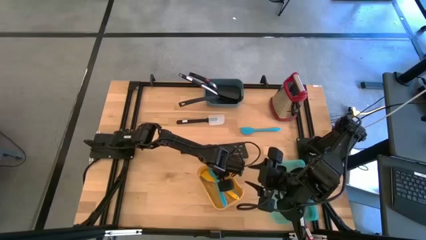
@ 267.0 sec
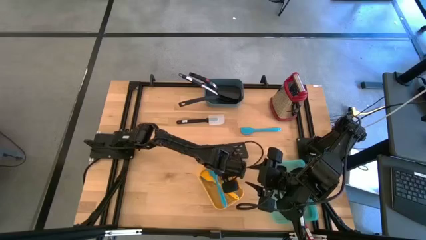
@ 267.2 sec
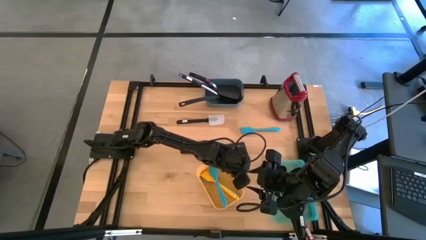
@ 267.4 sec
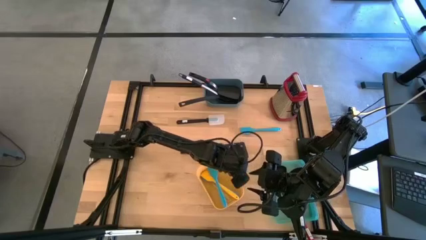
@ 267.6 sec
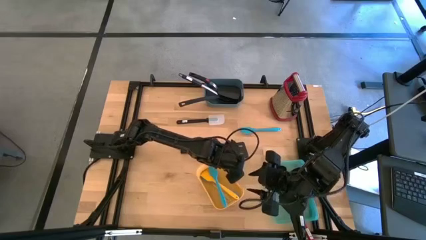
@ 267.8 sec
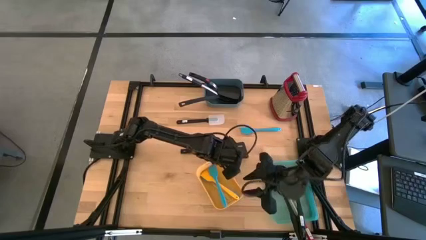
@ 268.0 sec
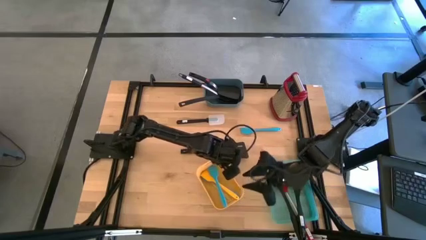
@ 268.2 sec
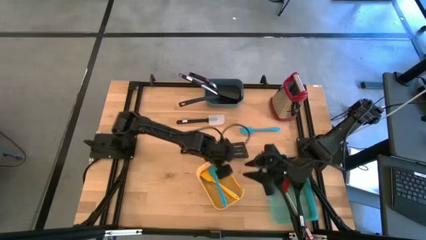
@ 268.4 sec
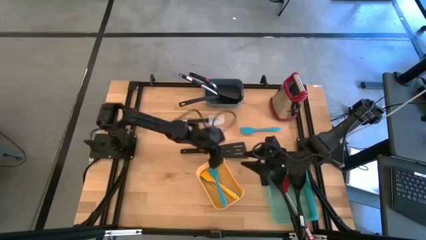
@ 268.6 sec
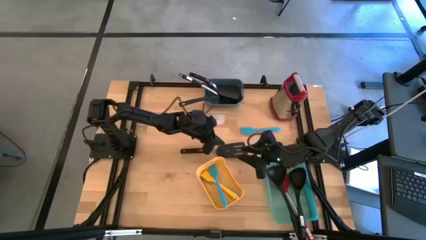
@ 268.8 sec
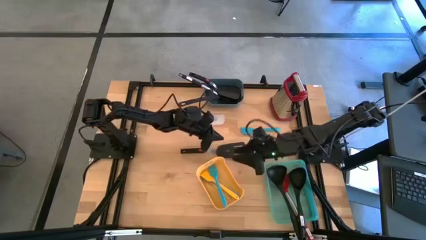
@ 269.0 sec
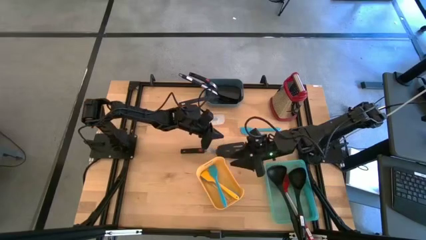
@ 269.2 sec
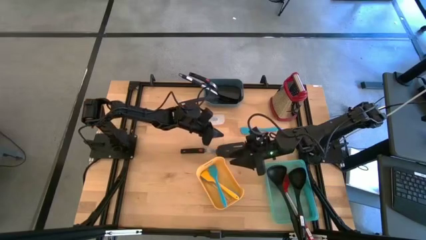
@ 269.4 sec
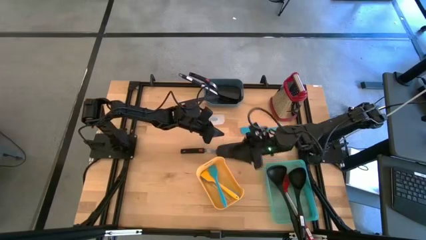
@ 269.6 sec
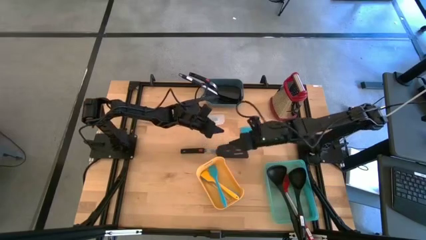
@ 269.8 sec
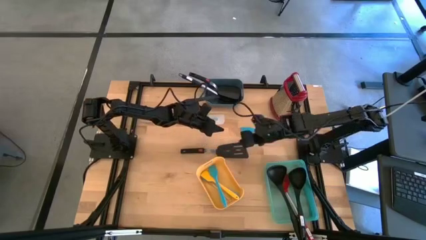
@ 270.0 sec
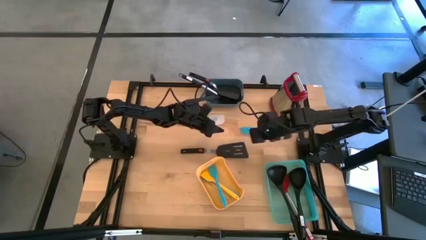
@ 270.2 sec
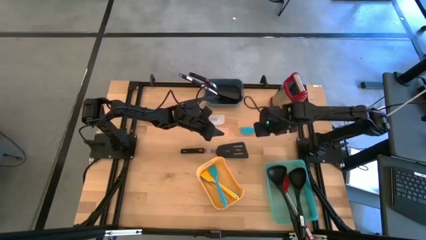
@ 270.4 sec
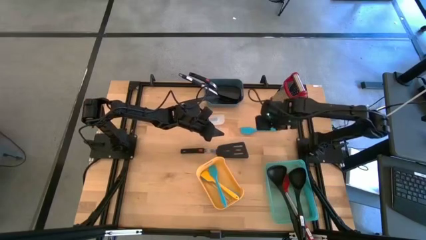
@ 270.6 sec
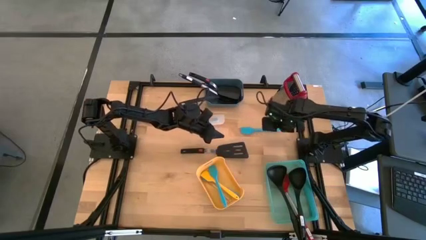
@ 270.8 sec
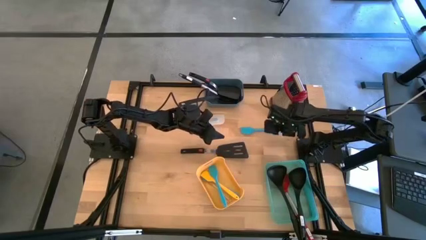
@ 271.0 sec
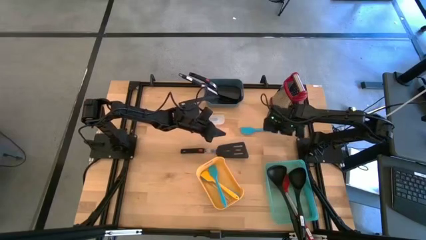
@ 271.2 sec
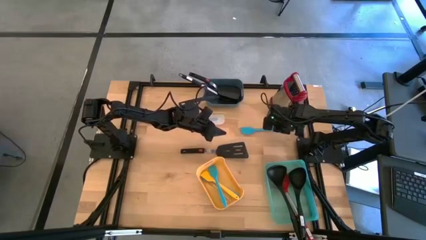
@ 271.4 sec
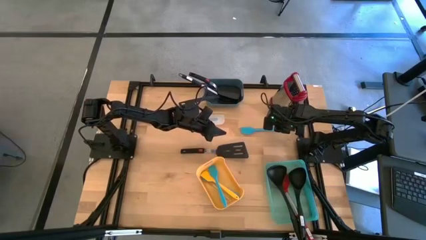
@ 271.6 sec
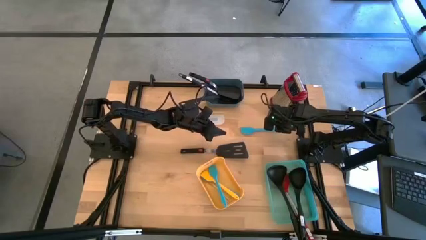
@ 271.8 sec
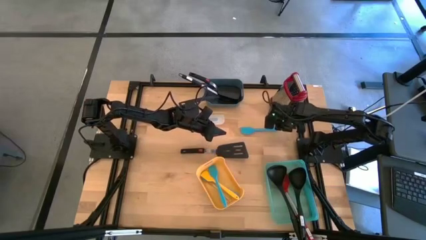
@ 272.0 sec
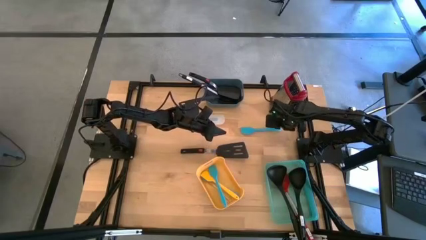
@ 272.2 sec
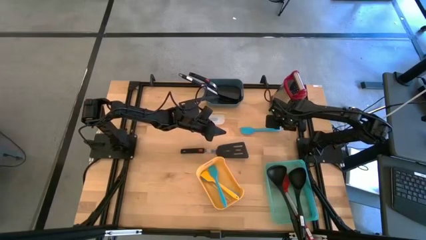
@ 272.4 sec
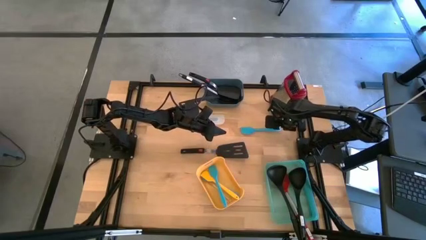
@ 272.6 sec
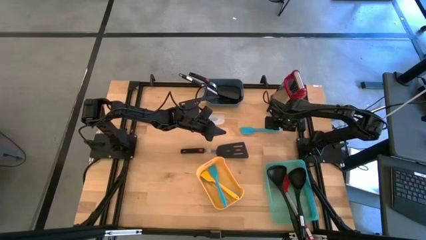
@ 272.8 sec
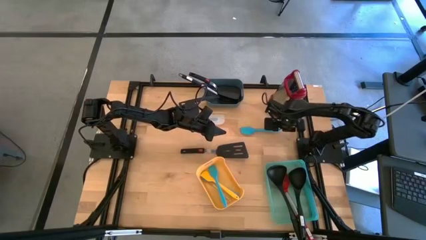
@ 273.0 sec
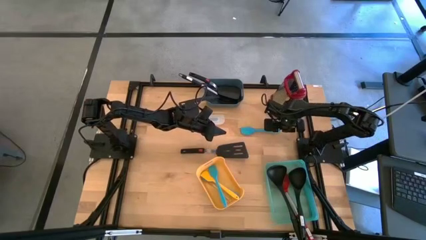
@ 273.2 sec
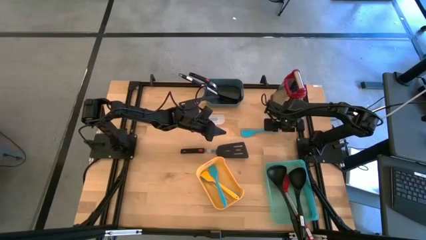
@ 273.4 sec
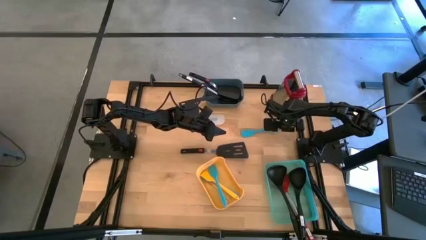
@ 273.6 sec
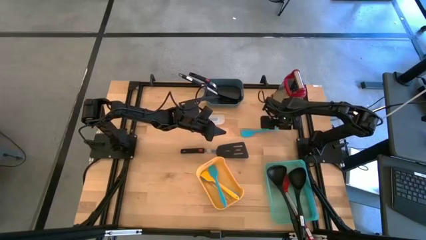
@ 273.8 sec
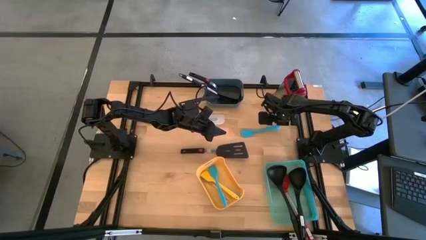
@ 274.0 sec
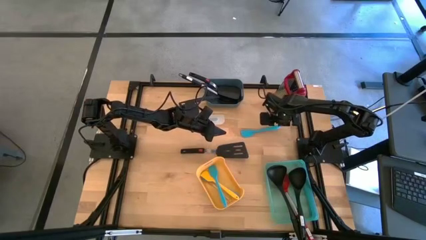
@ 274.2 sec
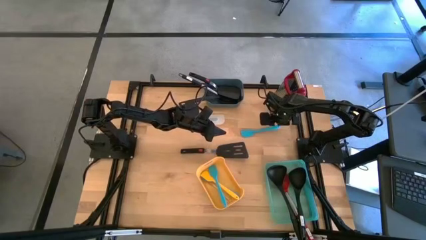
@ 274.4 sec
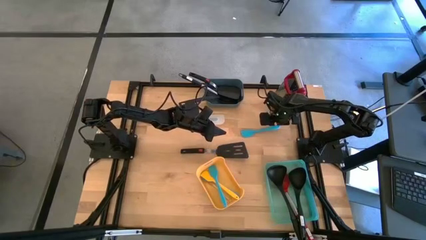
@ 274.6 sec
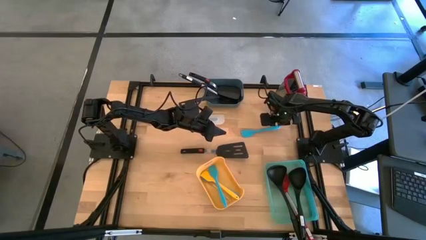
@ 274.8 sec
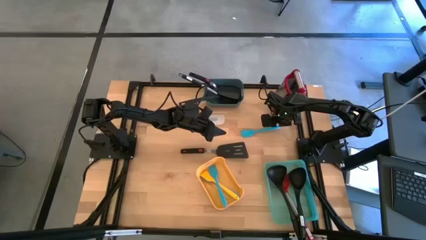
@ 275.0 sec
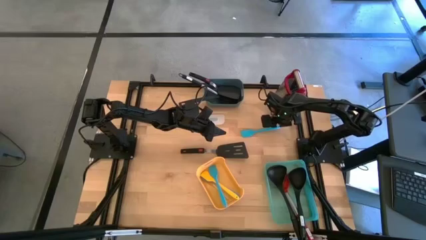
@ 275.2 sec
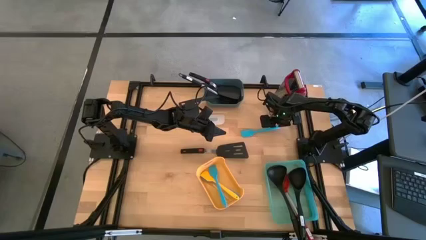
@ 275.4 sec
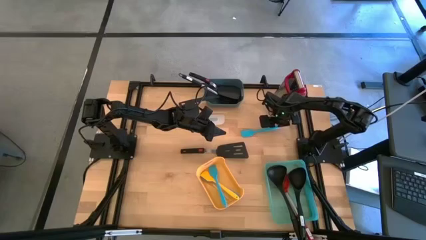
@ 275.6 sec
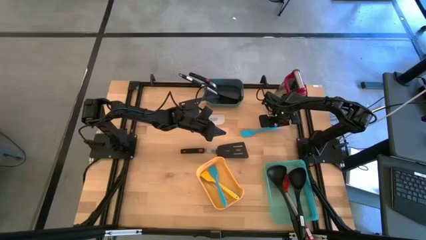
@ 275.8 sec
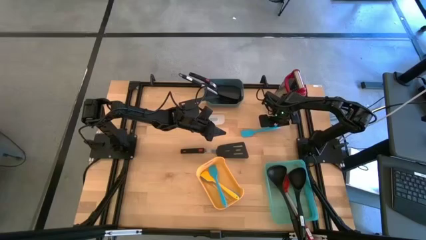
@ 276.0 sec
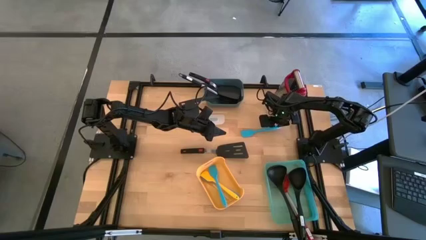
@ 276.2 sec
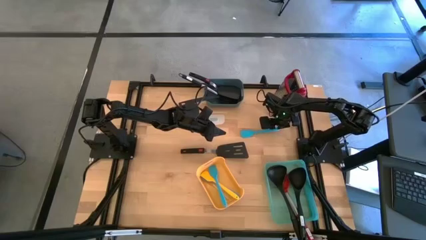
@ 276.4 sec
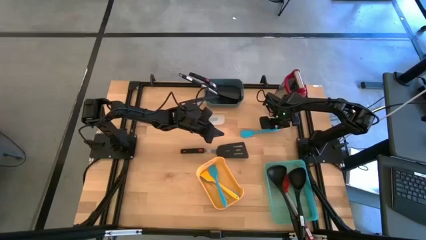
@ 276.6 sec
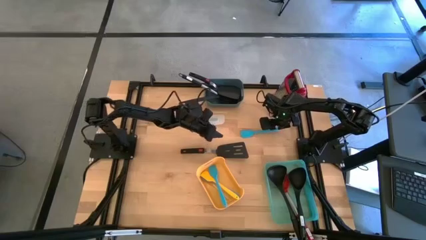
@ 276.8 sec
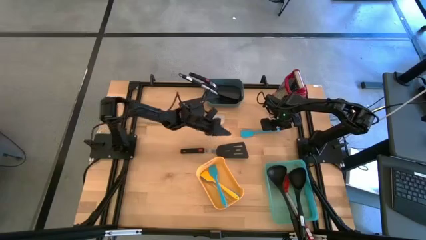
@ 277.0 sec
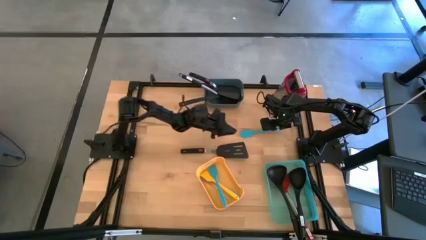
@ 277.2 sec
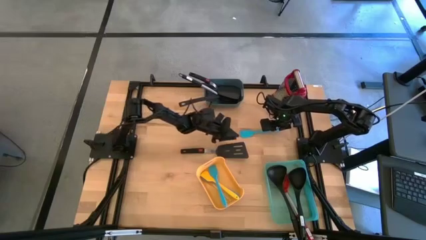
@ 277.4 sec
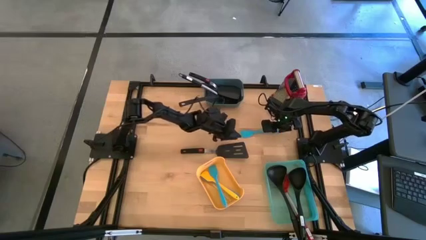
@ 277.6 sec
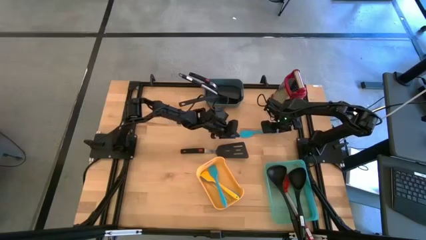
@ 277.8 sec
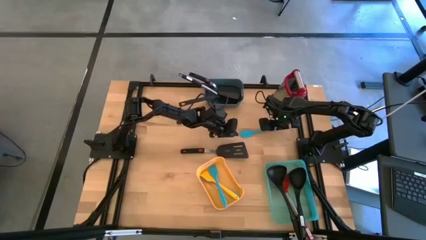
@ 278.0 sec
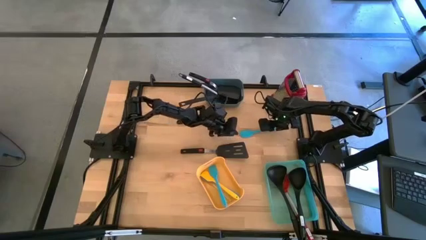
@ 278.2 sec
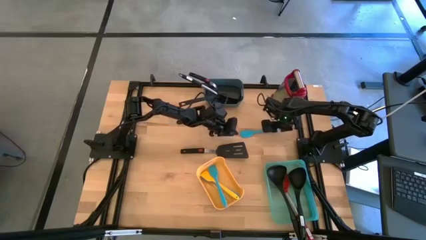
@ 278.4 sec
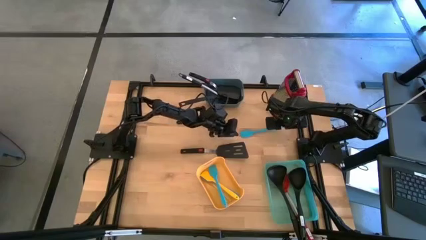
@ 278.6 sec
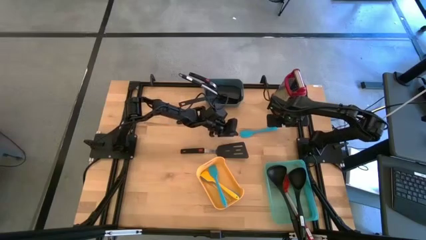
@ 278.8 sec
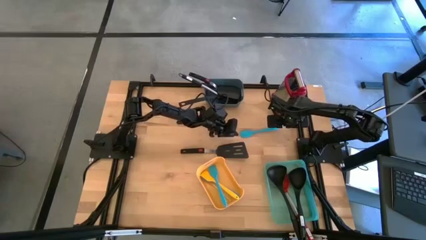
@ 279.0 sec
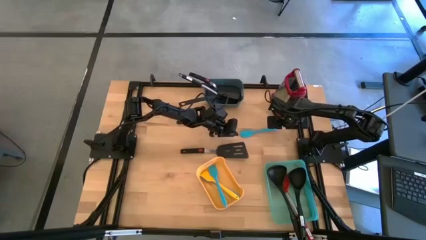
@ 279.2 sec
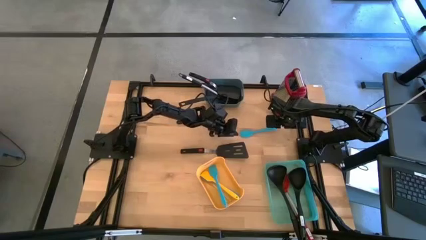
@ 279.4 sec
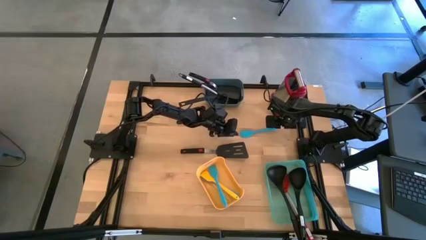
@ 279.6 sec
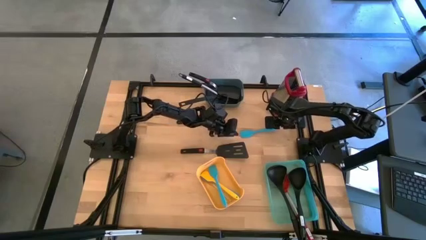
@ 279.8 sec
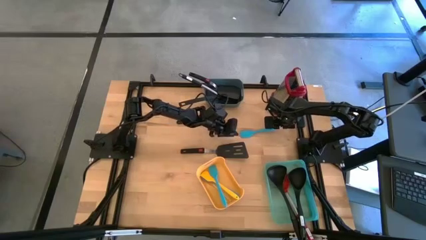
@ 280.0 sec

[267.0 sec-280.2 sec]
Task: Pick & Place Kitchen Items
Put the small blue spatula into the yellow bin

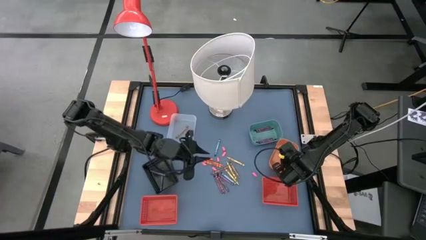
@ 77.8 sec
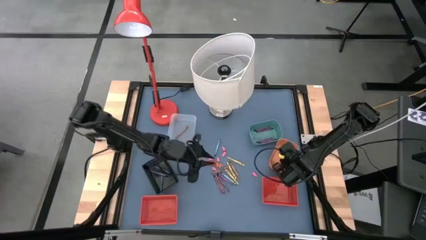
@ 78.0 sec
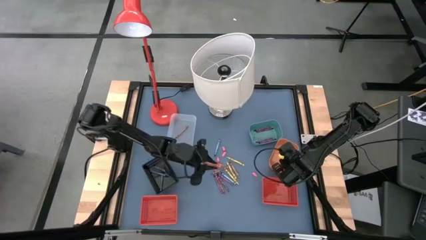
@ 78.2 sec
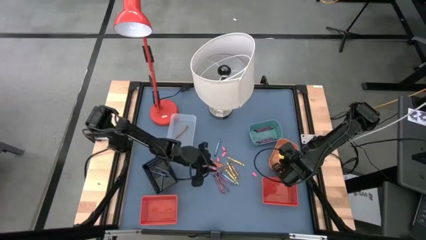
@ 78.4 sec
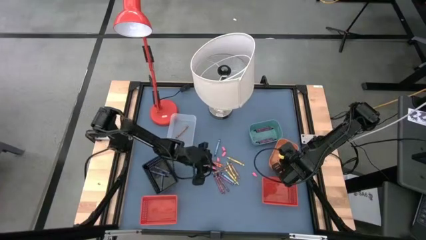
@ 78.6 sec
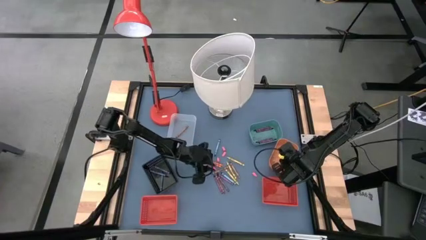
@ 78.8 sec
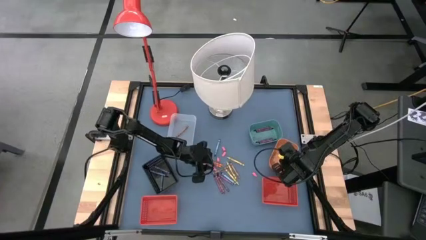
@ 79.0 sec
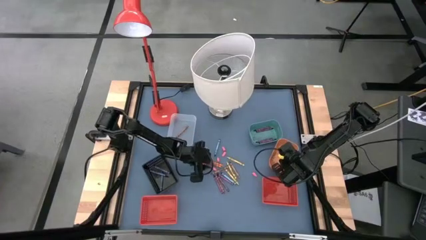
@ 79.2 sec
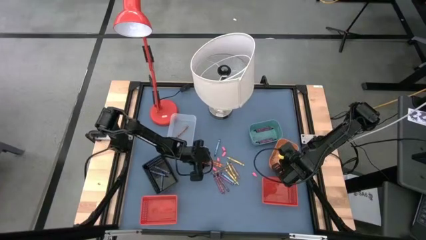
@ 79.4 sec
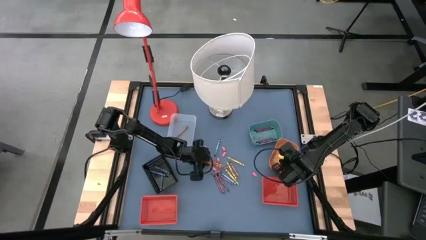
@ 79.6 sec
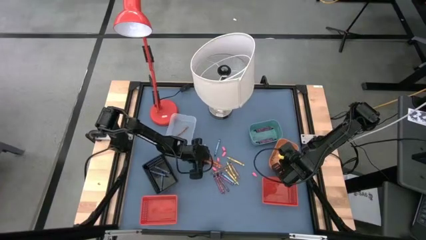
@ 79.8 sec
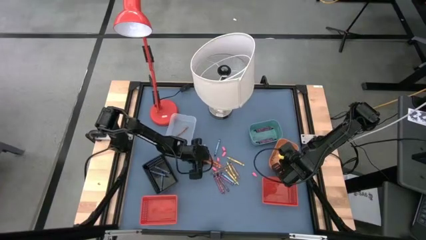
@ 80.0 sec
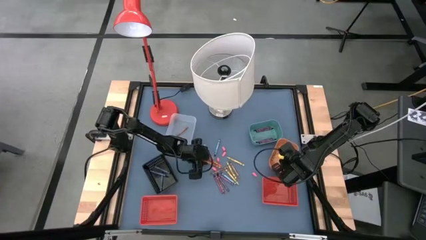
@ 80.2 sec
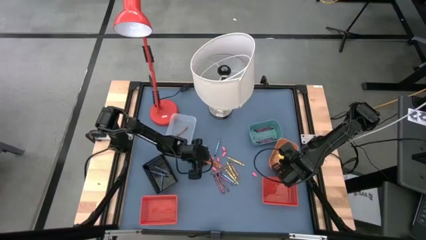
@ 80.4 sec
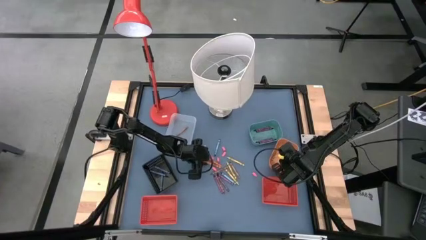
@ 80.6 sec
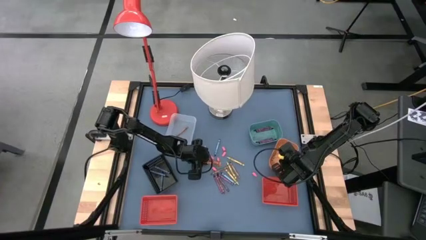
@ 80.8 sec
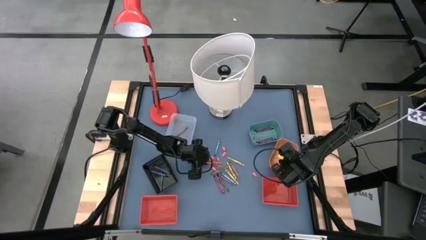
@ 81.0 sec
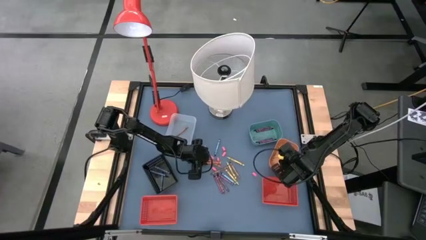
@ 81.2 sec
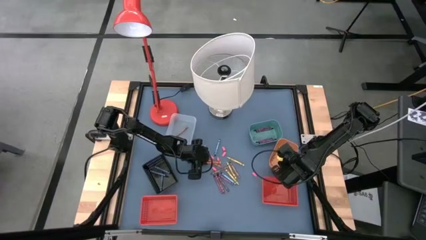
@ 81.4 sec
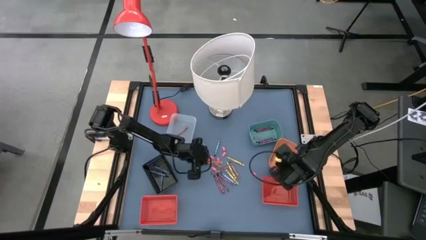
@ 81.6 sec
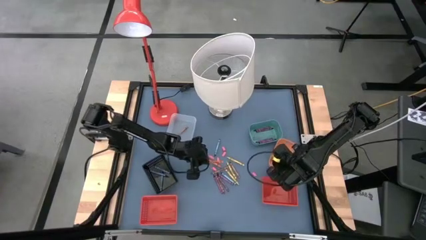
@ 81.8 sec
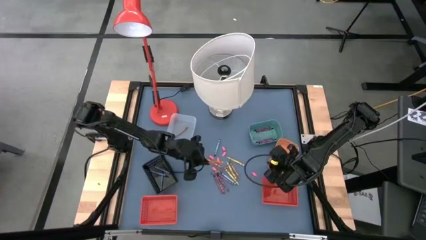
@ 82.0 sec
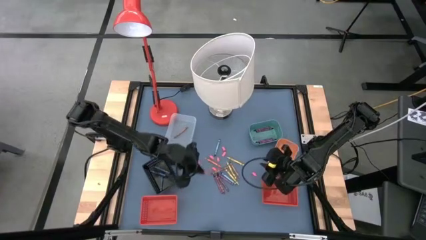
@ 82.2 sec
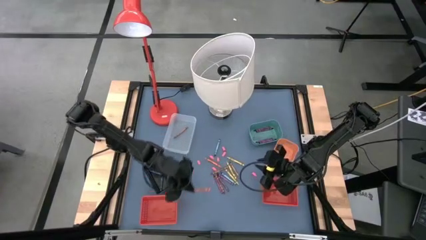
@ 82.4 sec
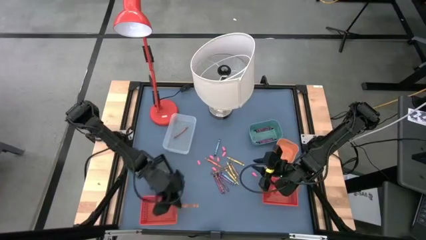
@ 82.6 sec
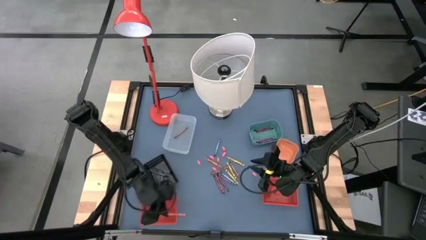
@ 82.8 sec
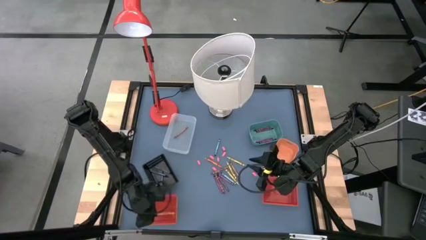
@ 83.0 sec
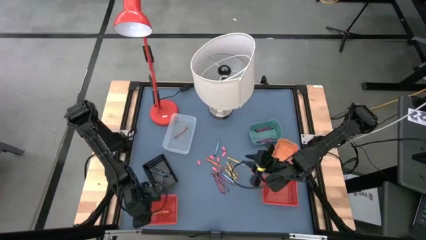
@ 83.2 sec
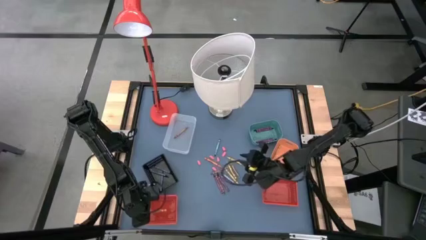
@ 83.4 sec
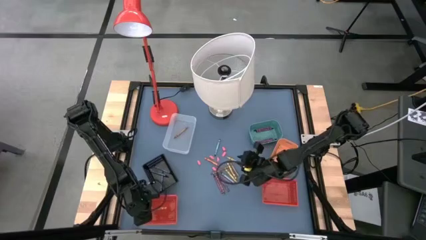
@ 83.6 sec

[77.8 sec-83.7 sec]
Task: Sort crayons
Put the orange crayon into the left red bin
